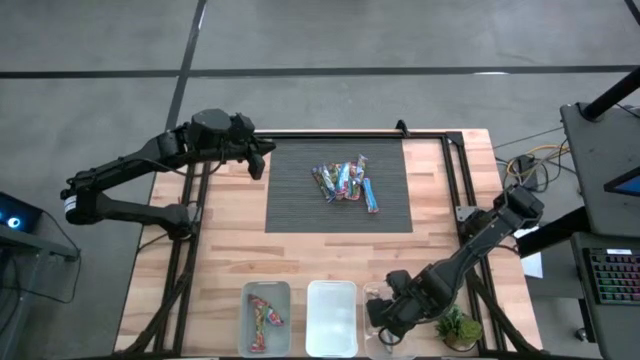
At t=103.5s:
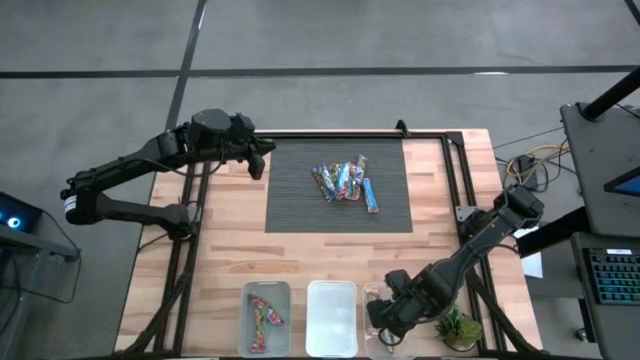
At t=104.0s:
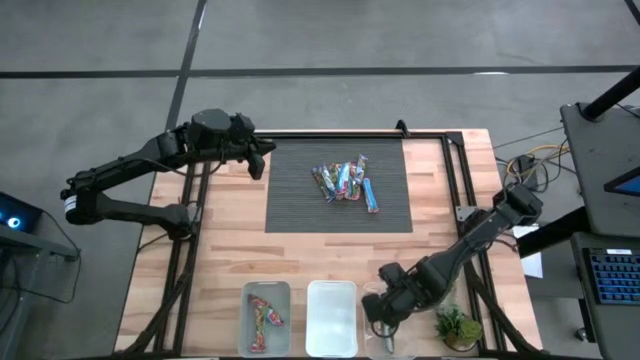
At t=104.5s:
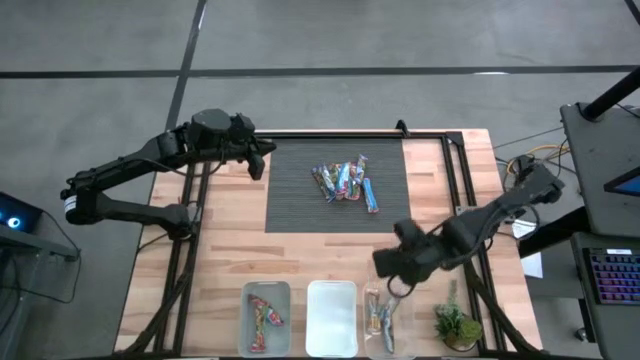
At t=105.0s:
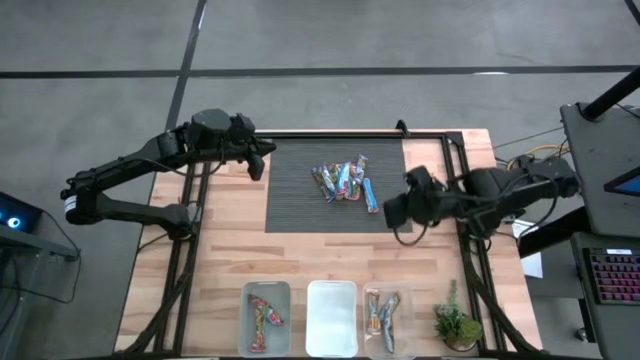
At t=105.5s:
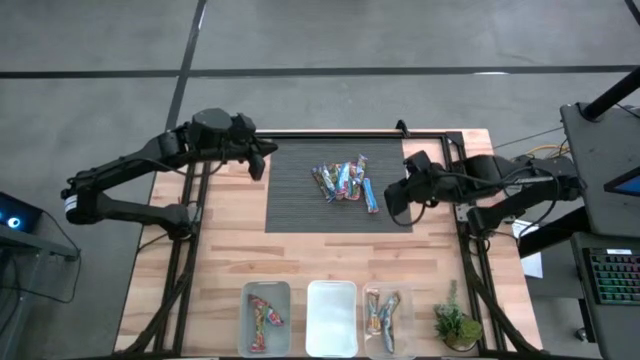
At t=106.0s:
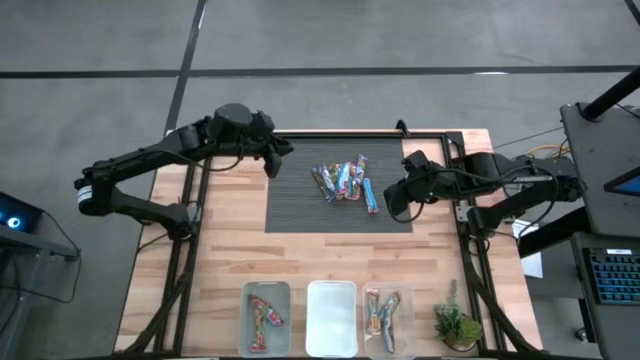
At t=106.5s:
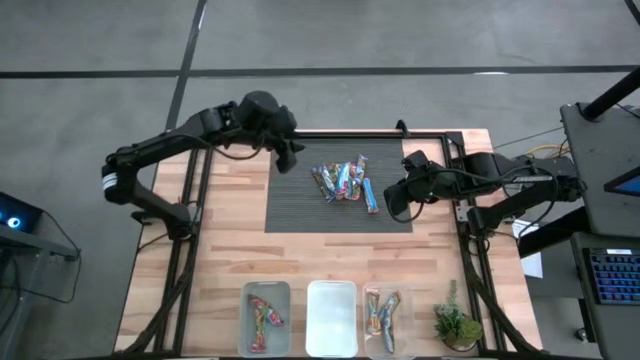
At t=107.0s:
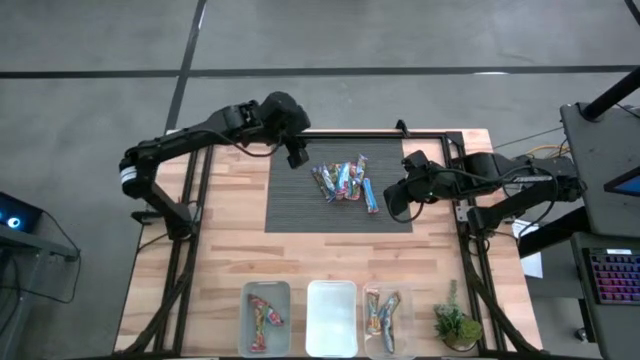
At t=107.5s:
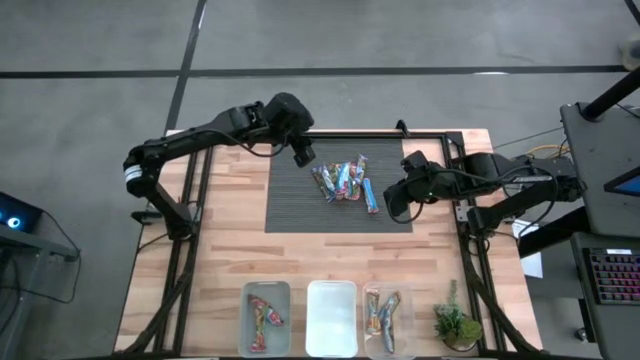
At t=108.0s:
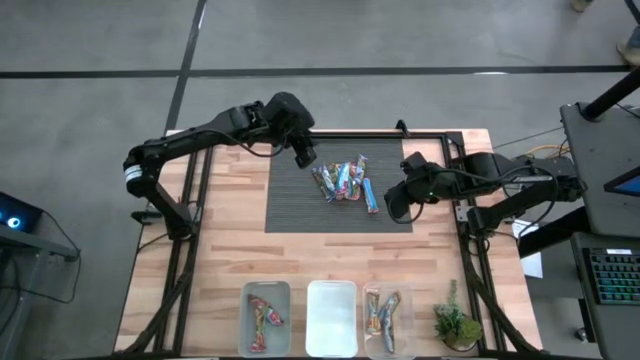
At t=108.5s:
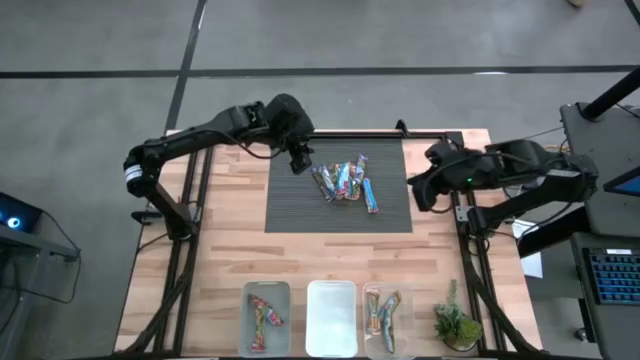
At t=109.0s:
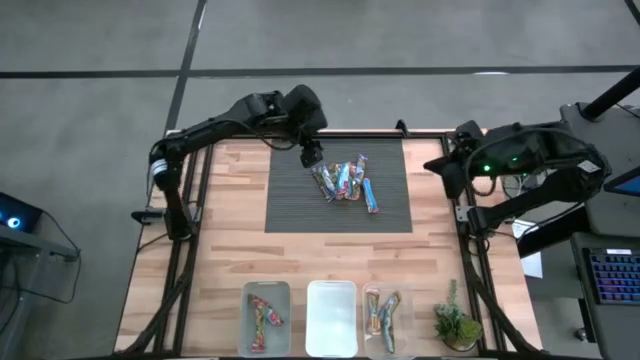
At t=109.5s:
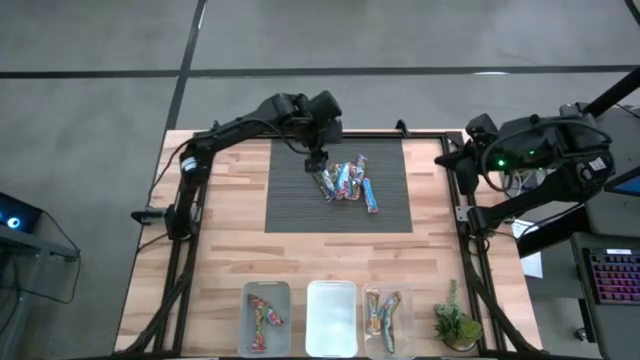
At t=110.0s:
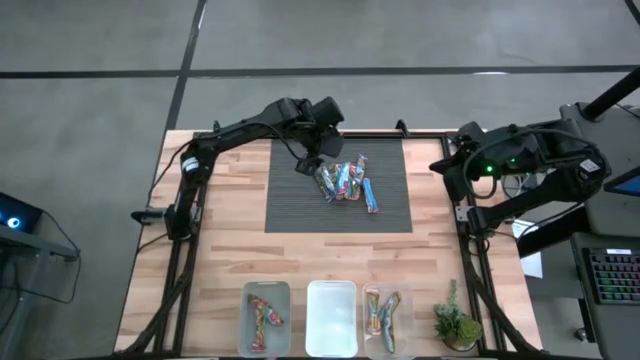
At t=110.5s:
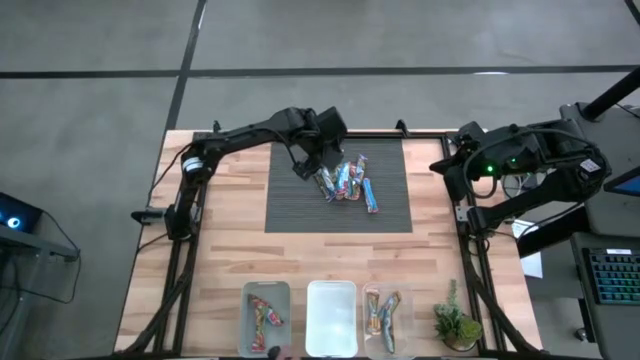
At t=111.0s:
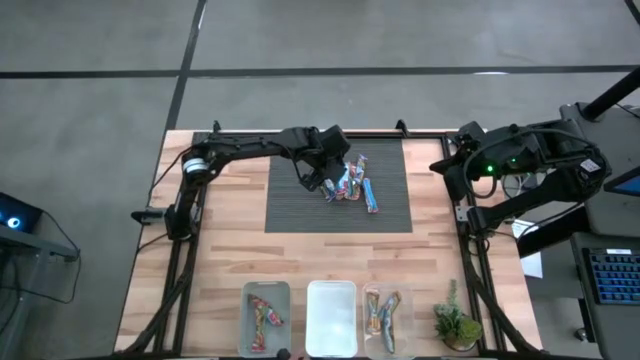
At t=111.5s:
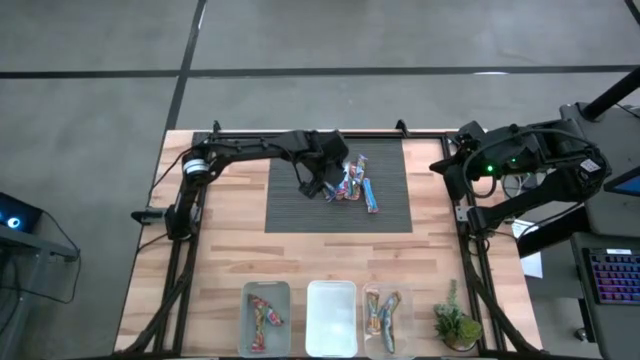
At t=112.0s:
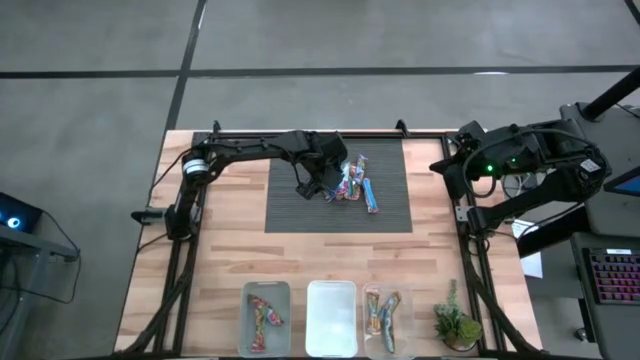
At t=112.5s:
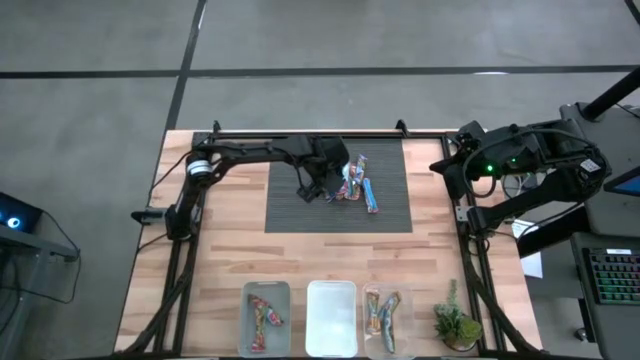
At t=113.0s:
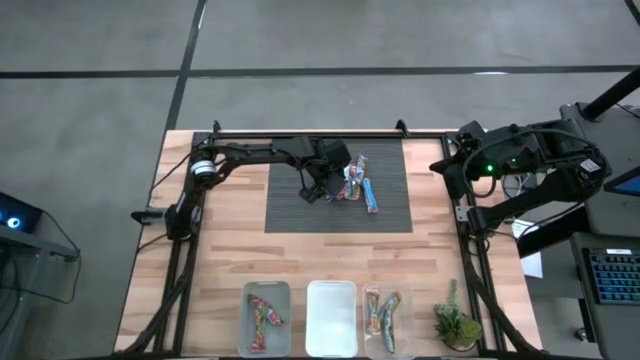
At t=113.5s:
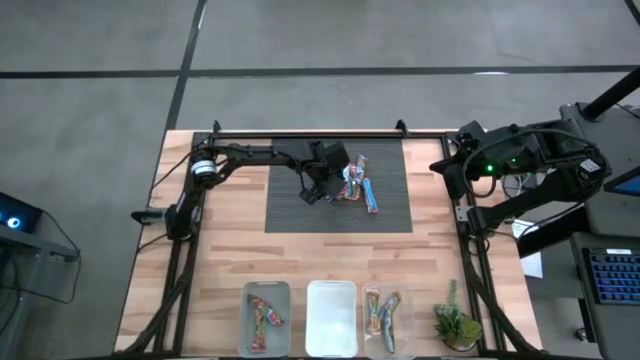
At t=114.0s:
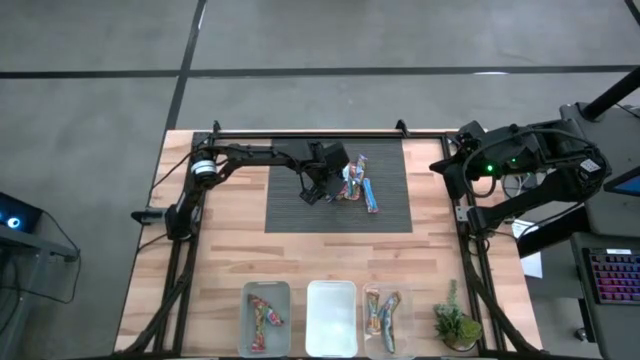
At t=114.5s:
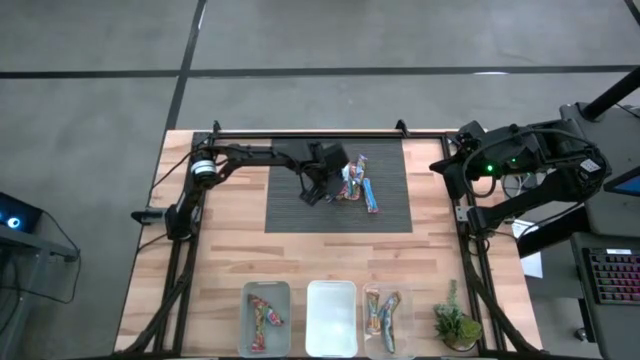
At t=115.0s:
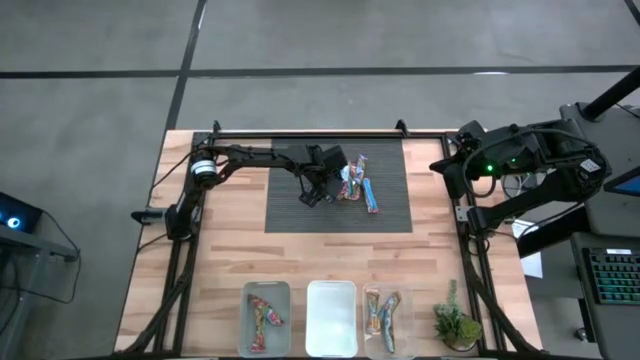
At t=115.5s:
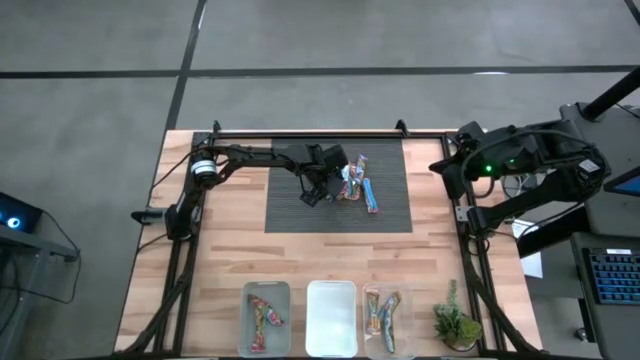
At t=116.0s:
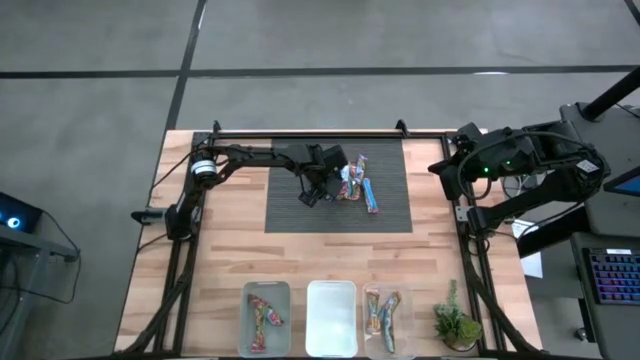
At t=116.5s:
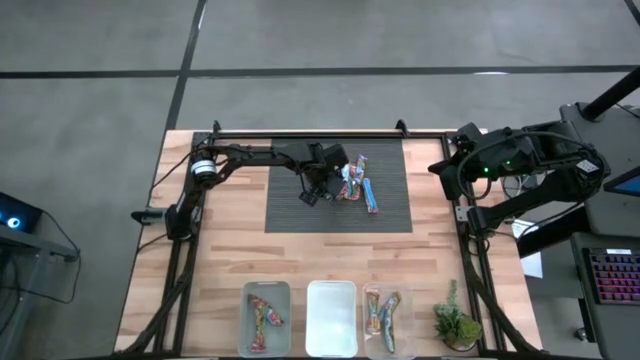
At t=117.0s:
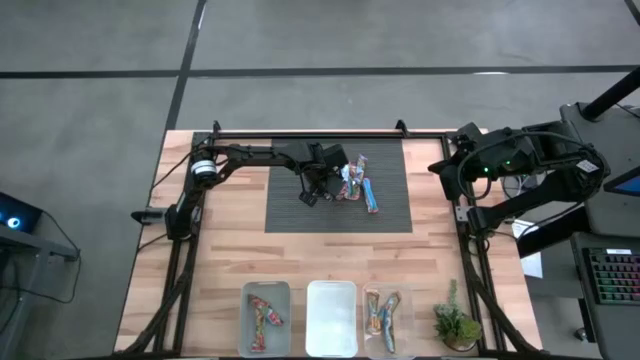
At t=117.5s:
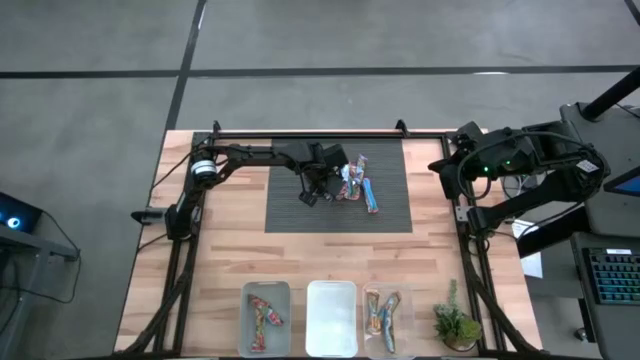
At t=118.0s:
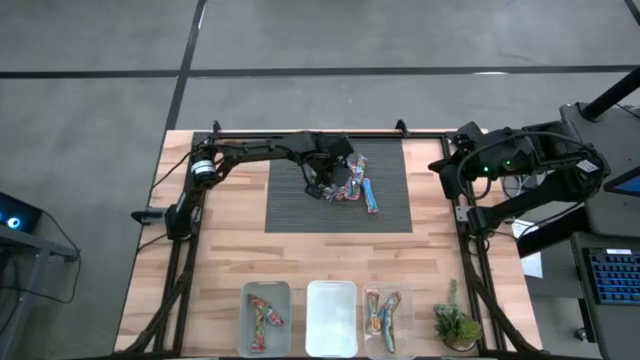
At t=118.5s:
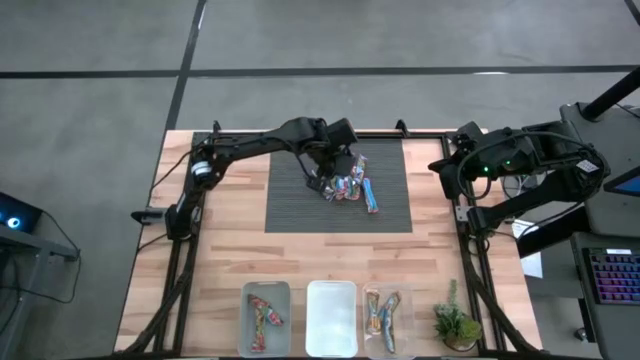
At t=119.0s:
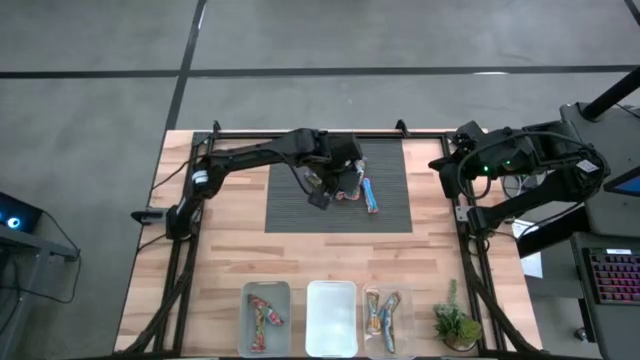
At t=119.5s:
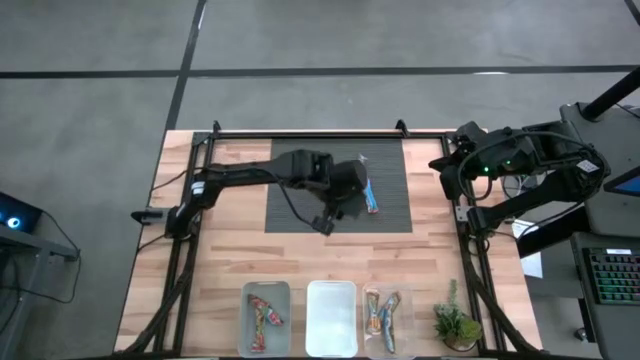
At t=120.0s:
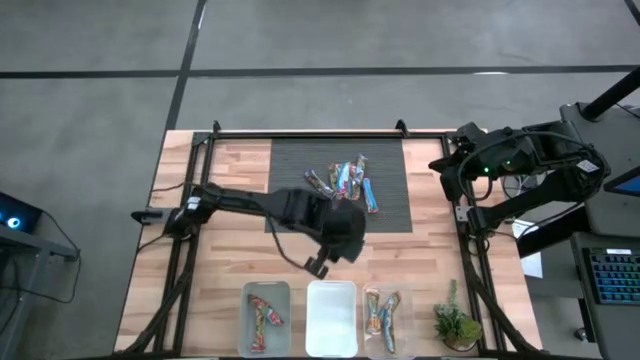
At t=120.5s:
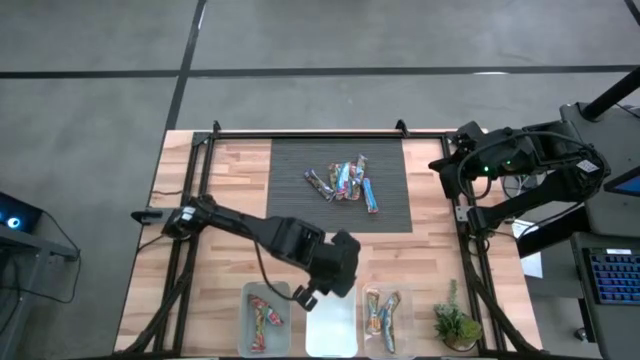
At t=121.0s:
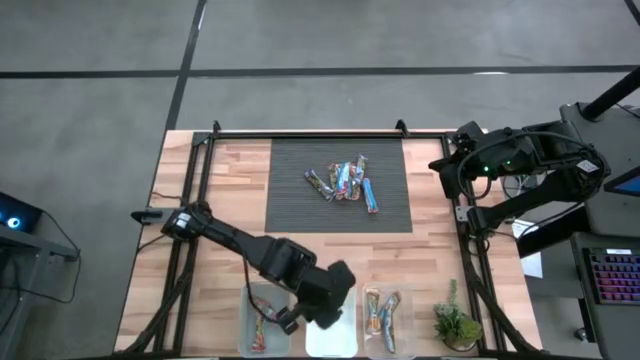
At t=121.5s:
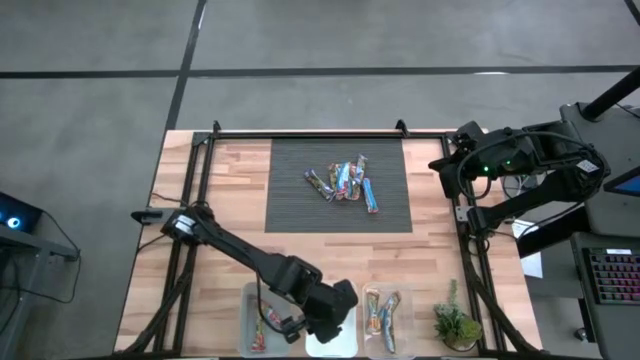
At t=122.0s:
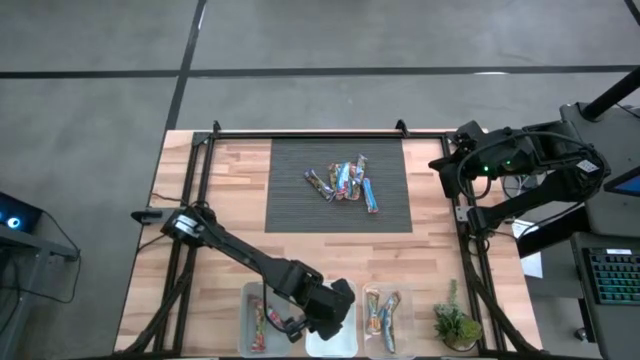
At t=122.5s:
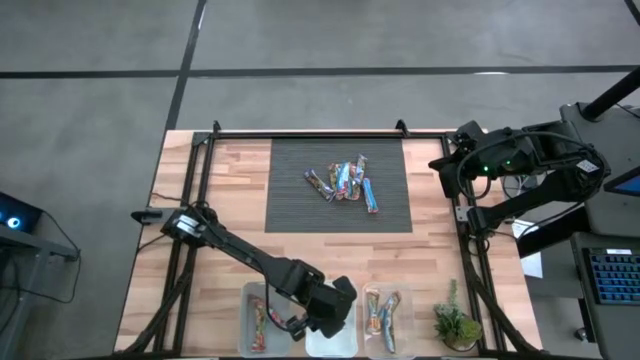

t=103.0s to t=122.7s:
Task: Pick and place Granola Bars by type
Put the middle blue granola bar into the white bin

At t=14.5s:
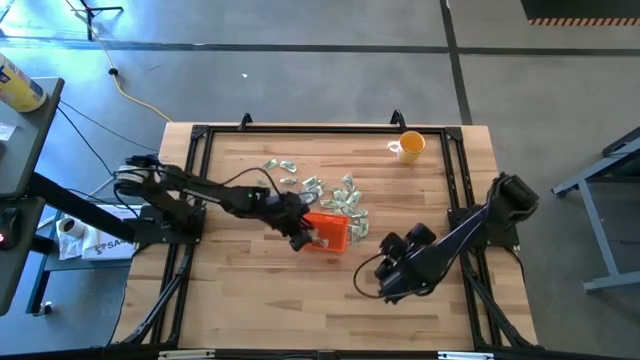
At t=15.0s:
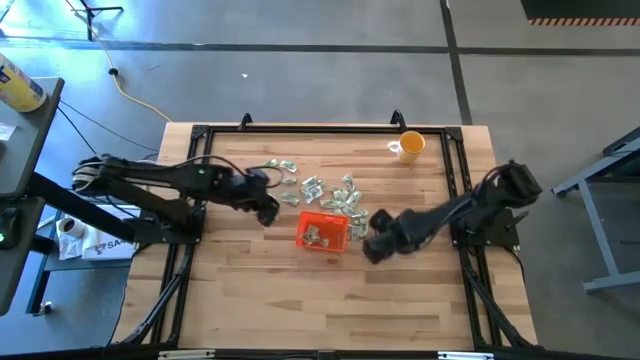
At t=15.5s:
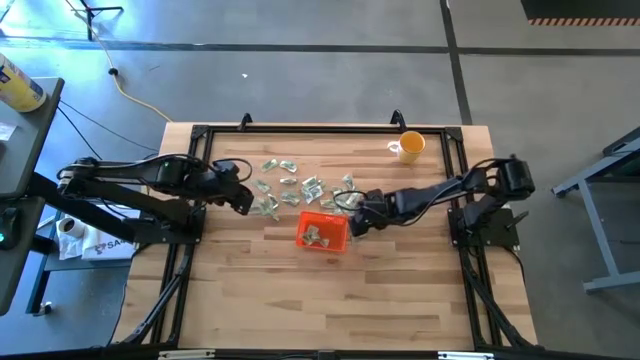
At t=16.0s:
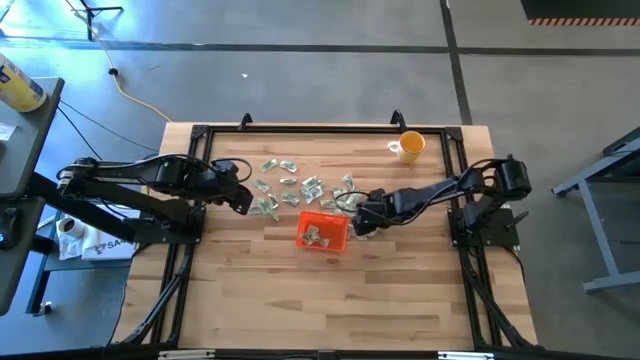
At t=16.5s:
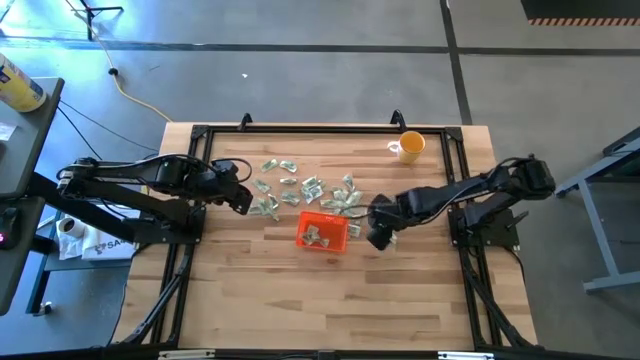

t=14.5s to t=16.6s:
Task: Pick and place Stevia / Truvia into bins
Put the stevia packet into the orange bin

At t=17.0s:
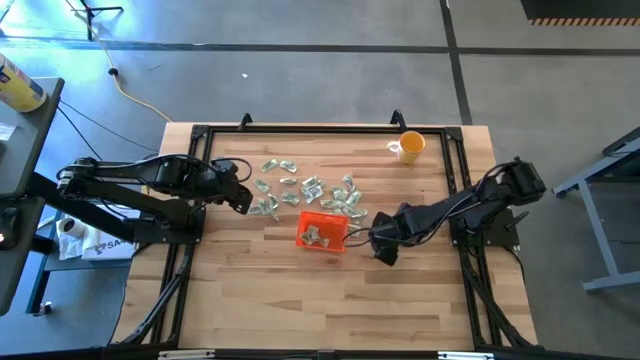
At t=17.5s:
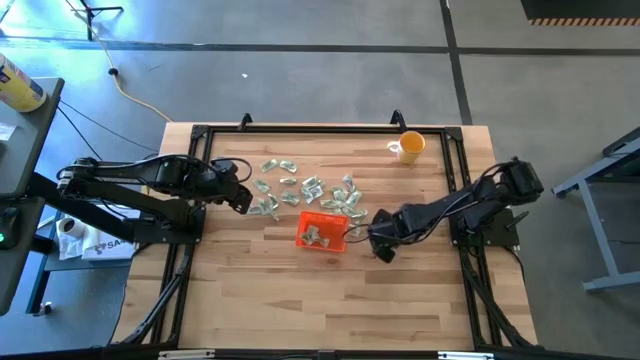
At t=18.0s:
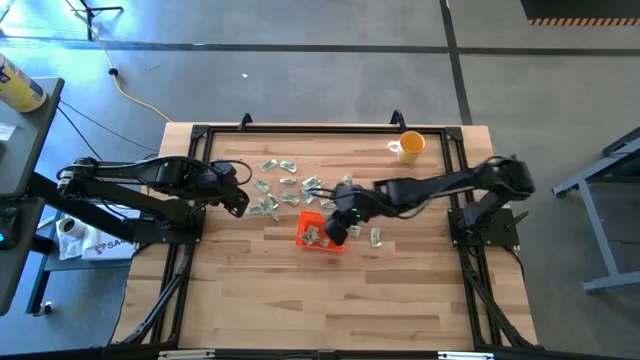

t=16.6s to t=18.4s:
Put the stevia packet into the orange bin
